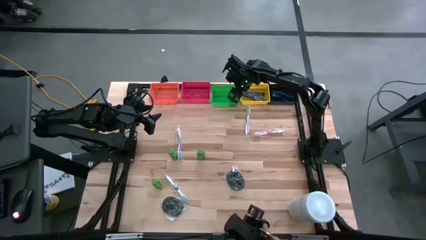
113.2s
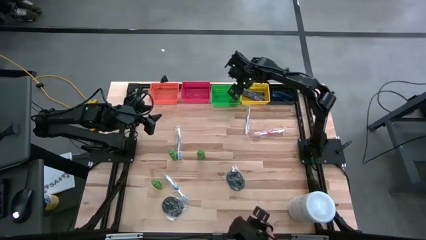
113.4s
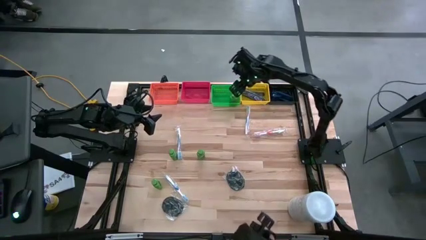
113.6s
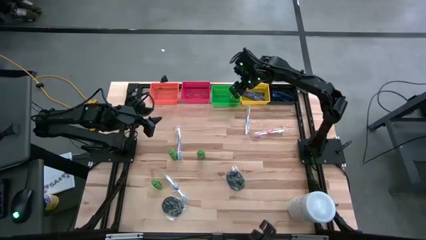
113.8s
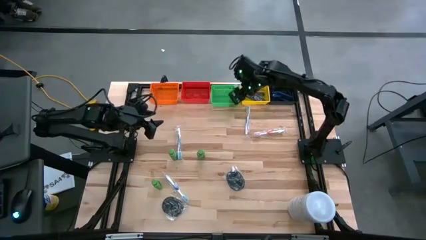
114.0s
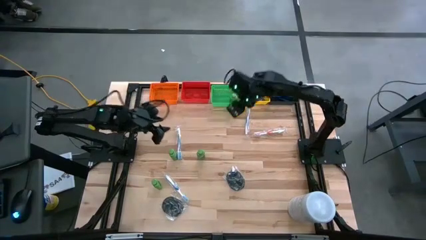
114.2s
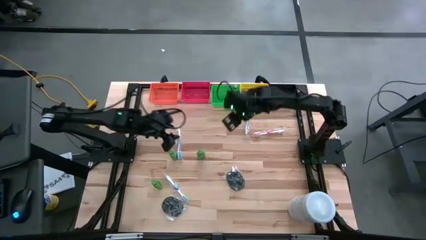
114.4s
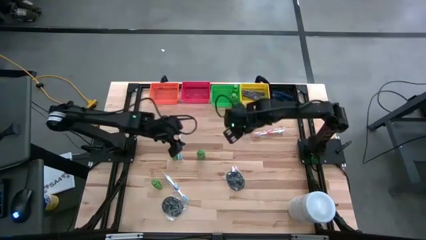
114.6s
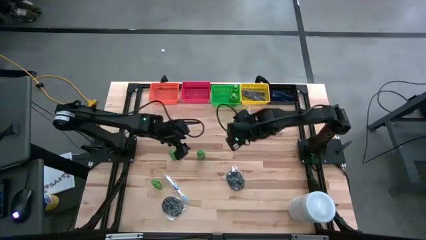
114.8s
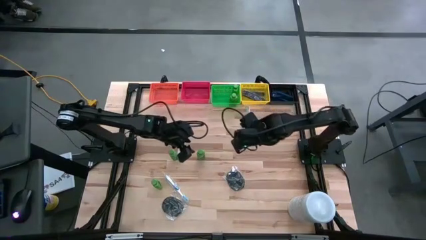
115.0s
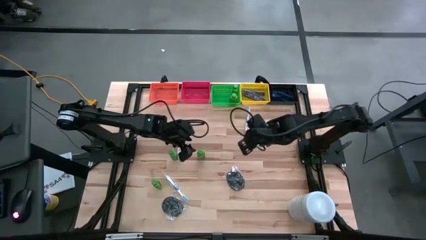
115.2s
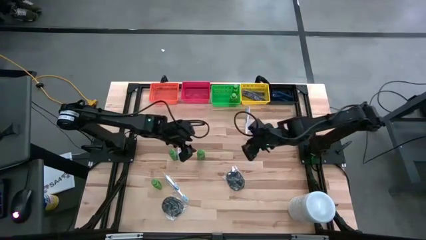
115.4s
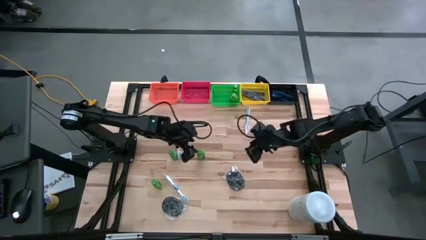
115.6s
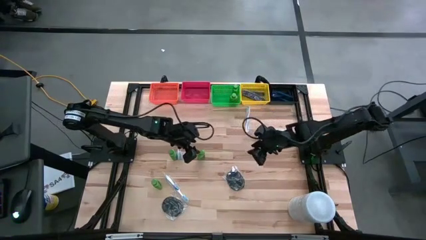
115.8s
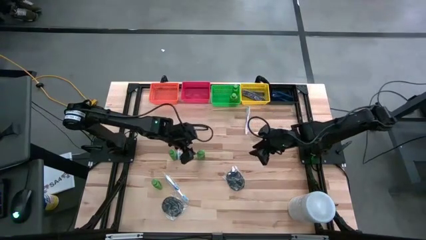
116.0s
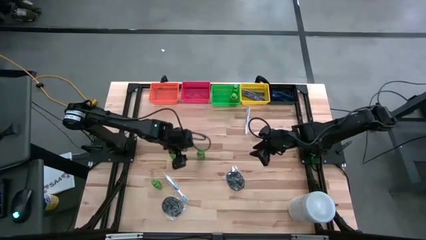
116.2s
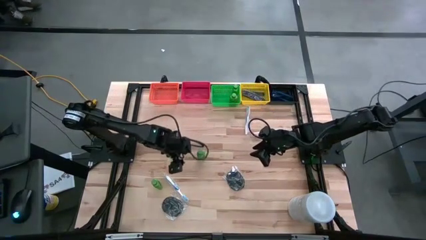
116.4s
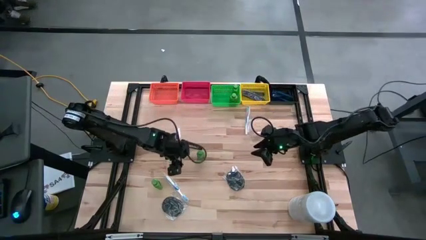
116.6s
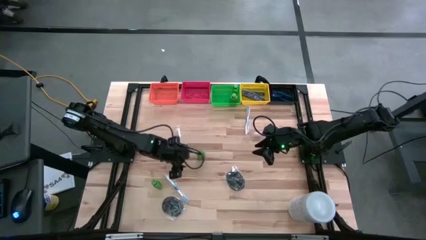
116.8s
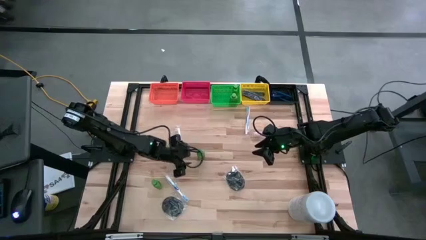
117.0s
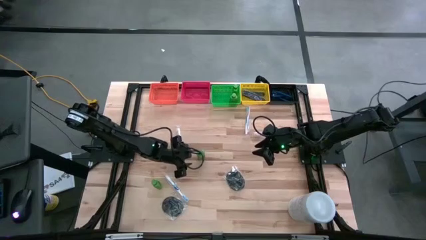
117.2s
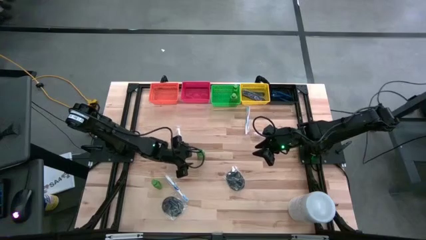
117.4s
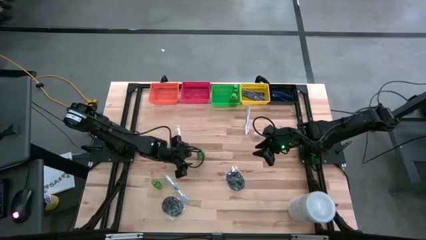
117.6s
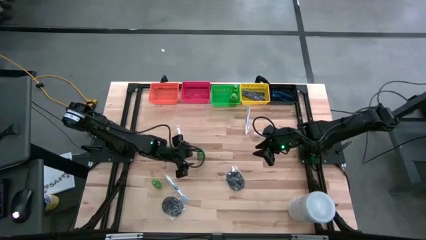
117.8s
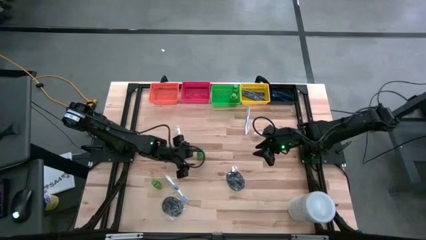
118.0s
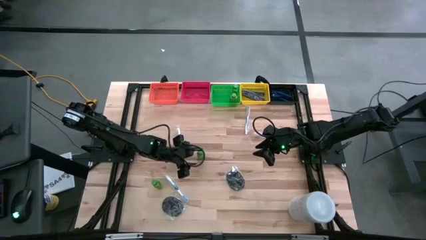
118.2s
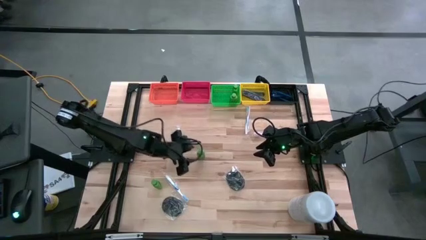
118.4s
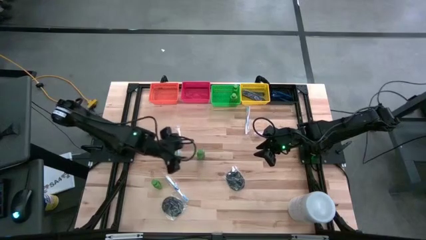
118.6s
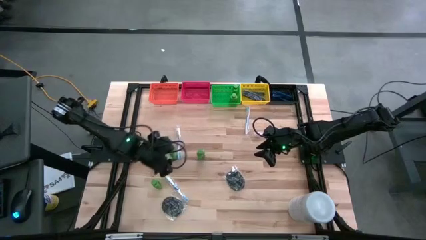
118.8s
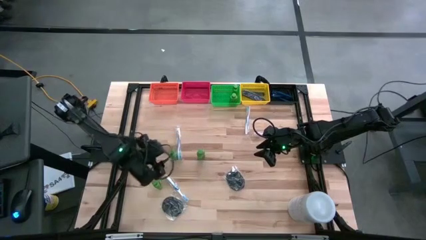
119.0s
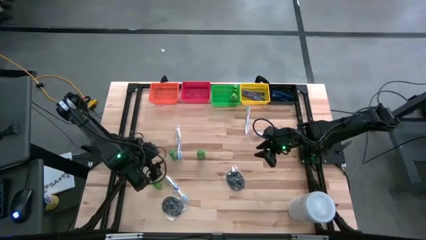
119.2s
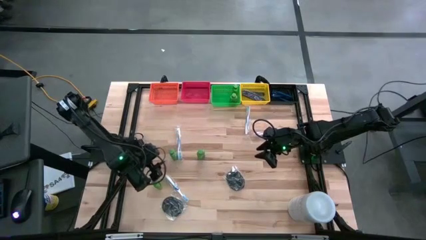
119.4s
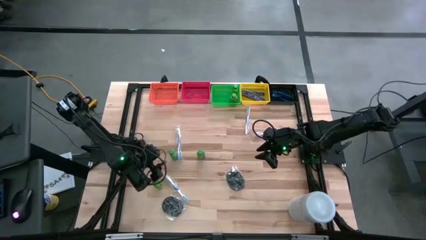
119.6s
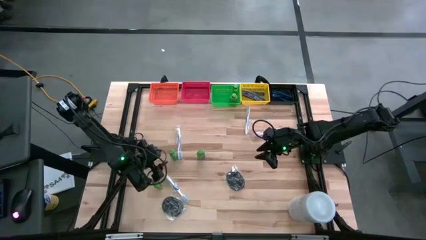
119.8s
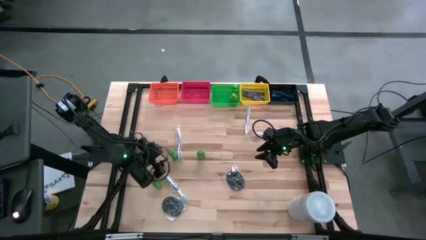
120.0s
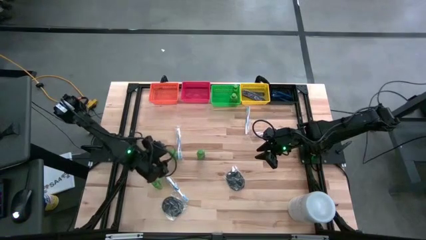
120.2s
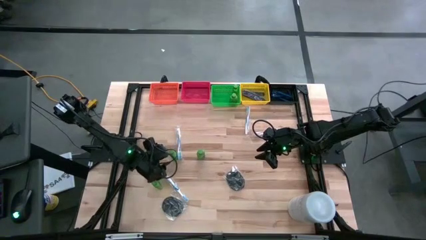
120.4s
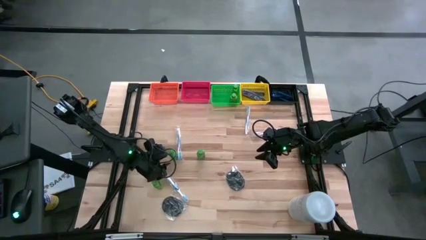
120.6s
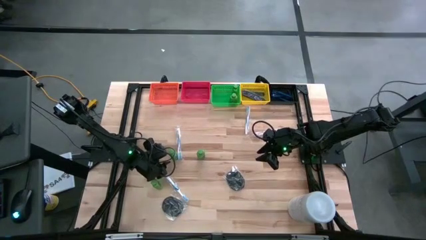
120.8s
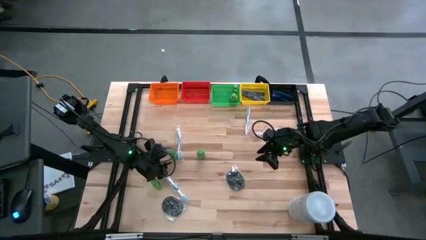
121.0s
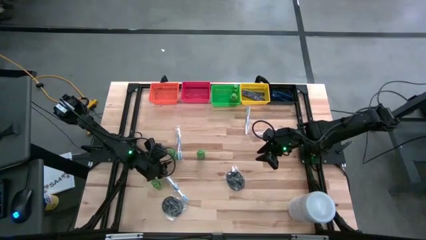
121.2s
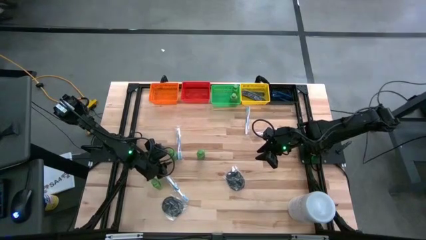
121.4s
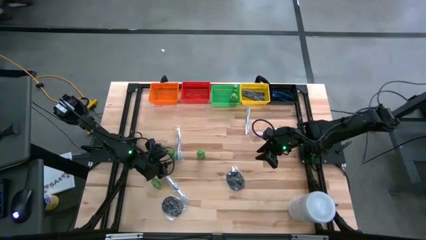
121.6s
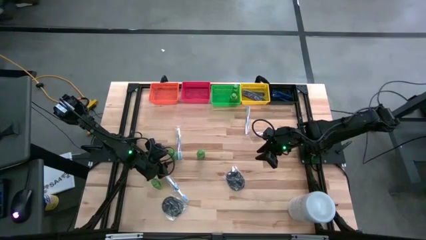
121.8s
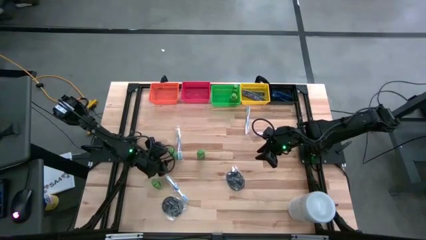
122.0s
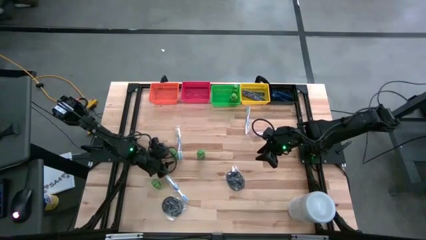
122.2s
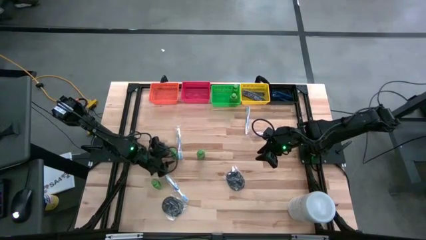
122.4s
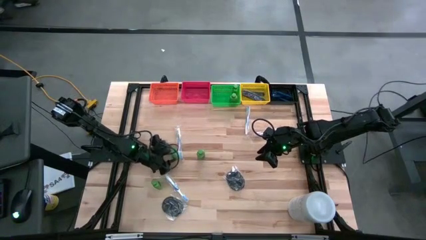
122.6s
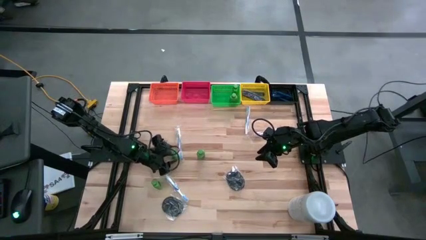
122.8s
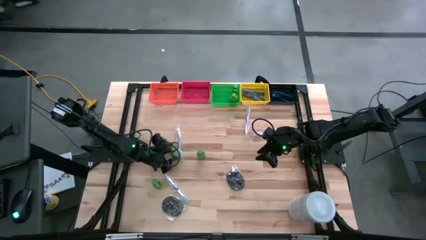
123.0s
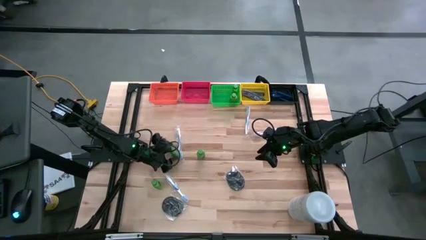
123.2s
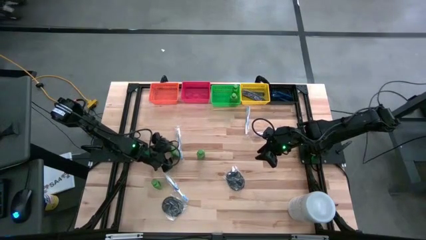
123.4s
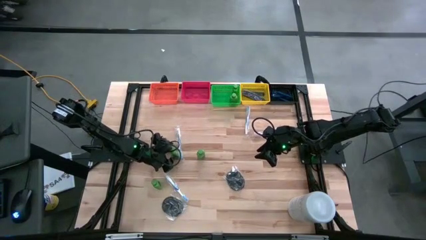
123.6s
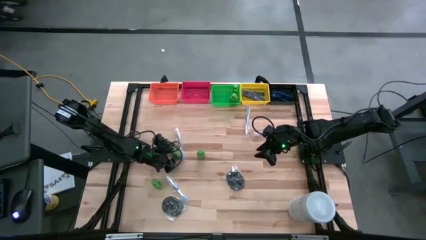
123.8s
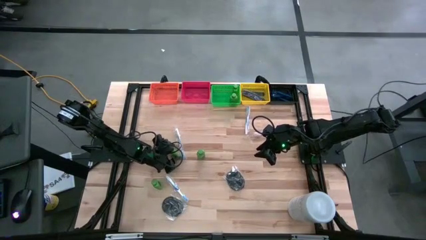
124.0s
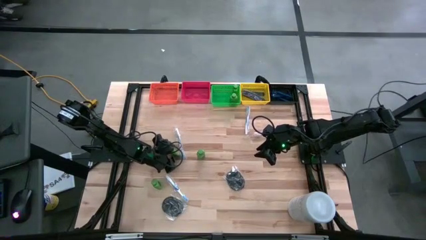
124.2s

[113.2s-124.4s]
Task: Pick & Place Travel size toiletries
Put the green shampoo into the green bin

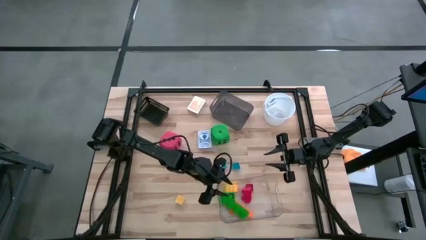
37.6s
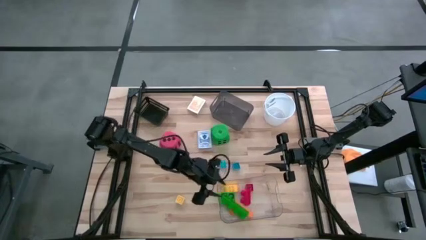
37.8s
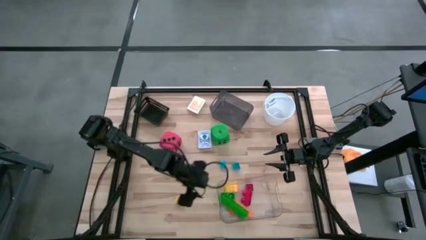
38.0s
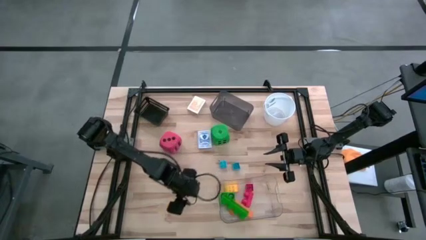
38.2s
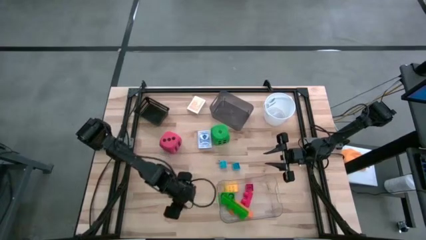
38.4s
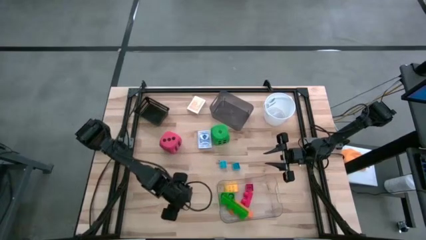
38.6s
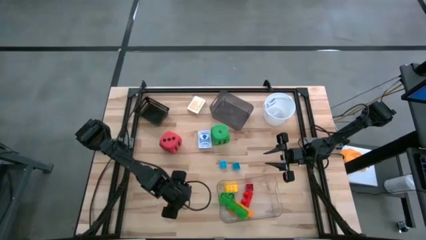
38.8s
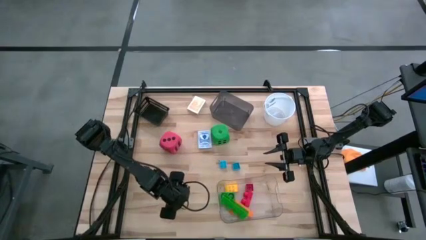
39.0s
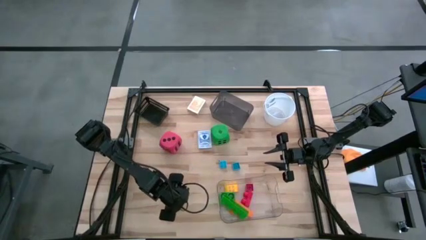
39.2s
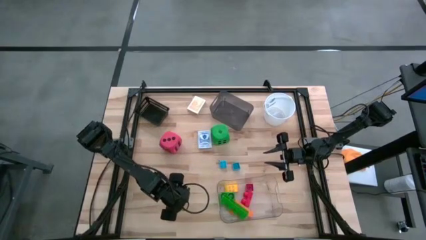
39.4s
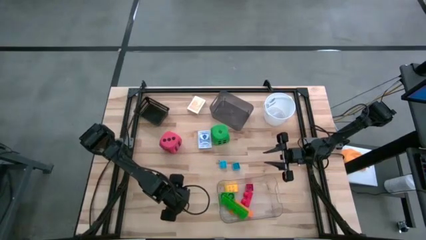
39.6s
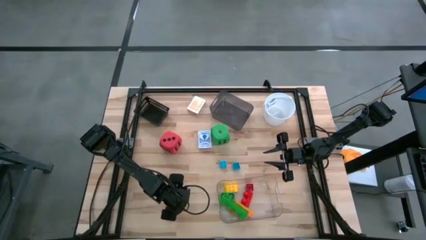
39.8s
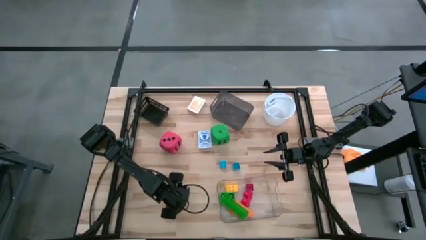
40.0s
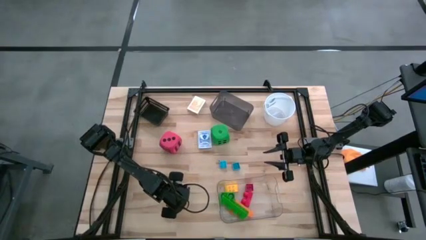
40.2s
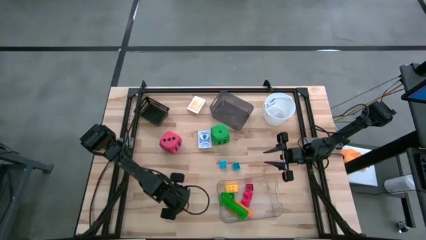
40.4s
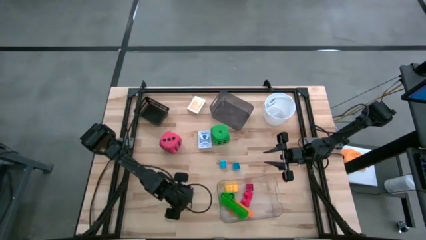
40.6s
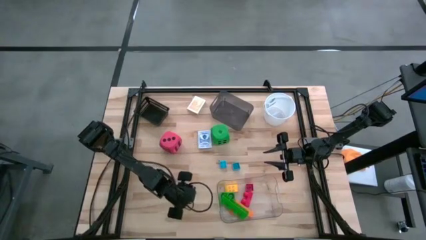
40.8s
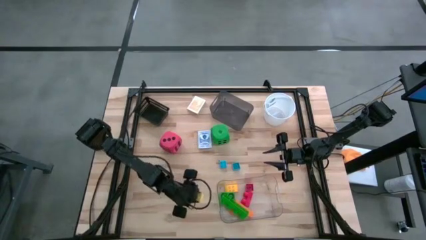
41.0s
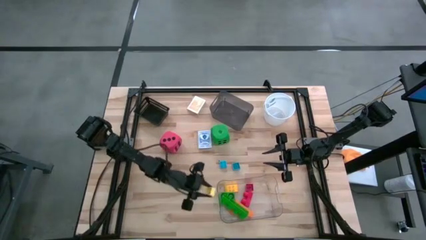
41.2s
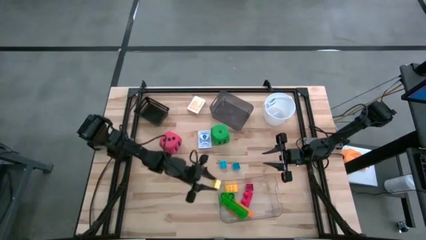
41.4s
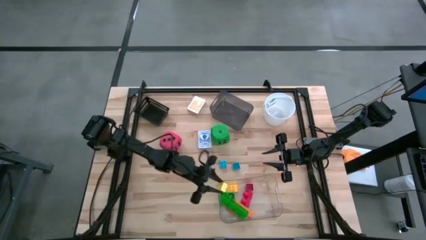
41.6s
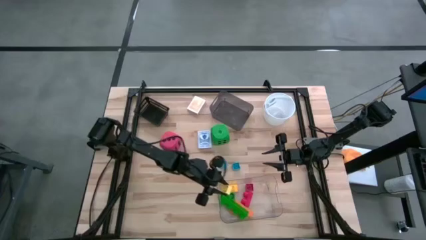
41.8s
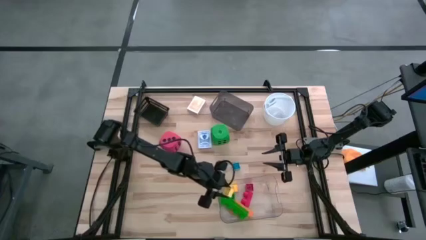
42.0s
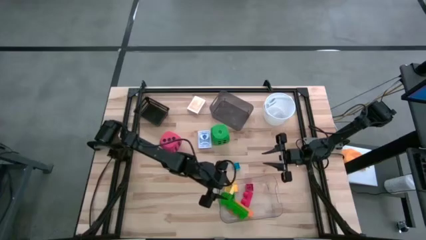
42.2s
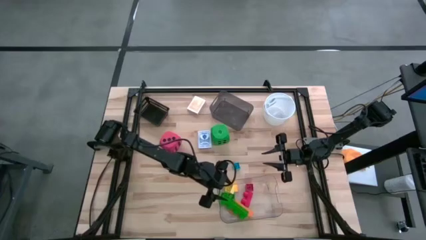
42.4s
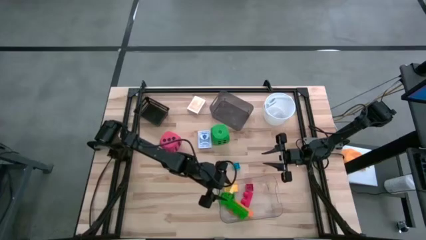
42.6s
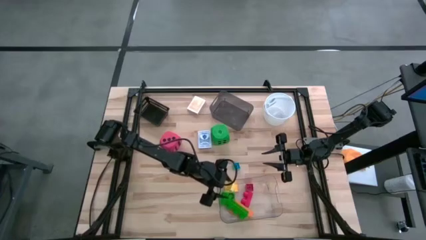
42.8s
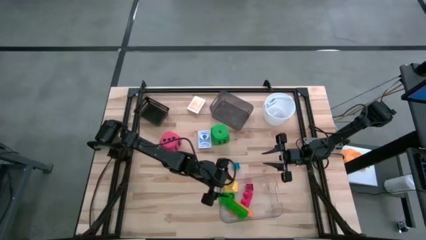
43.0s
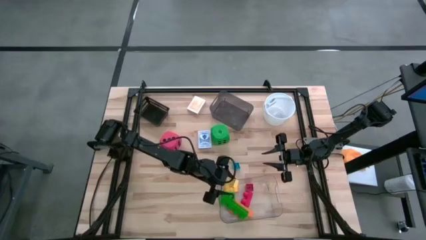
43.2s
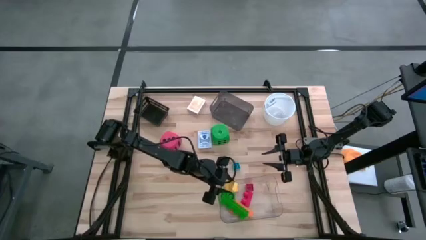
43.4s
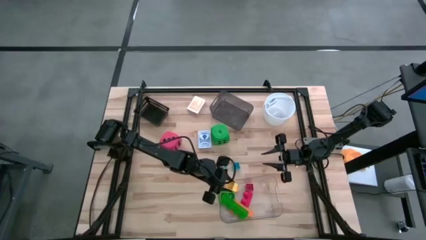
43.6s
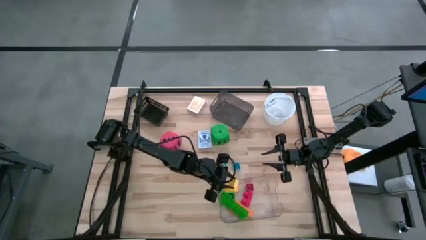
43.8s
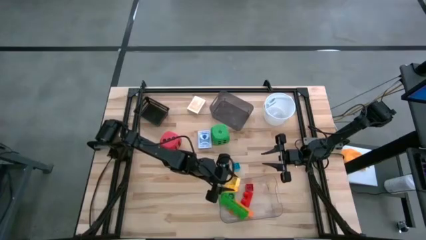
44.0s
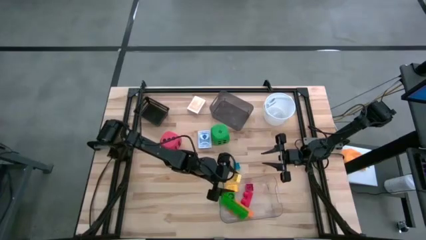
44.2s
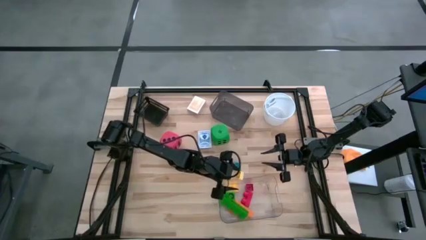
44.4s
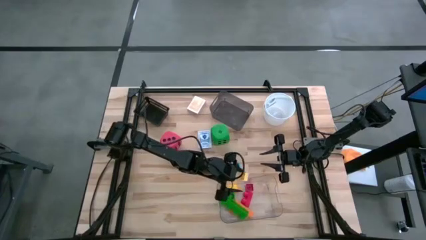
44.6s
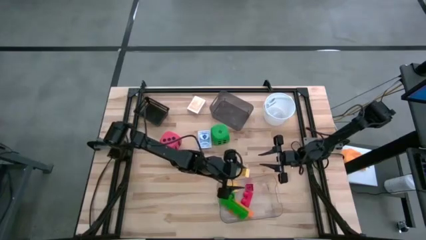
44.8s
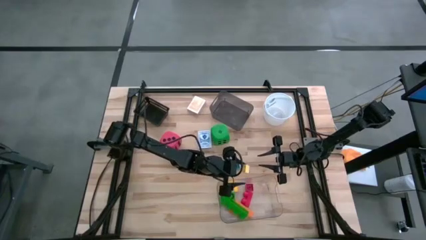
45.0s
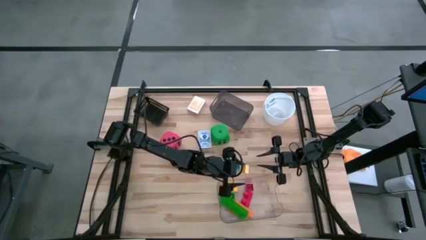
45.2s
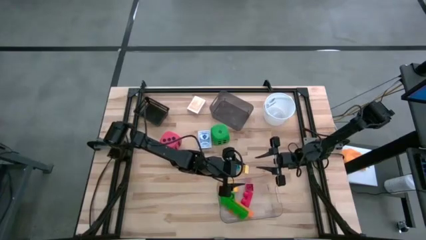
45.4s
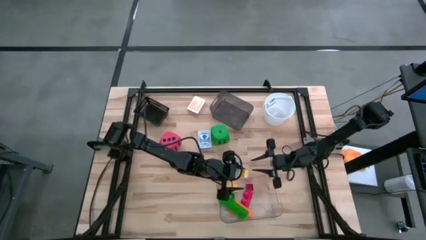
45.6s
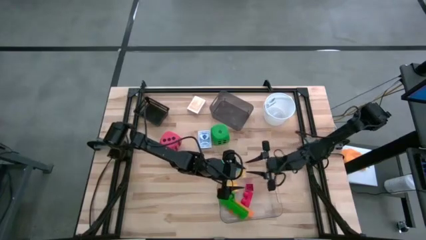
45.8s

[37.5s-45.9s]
Task: Pick & Place Toys
Put the yellow game piece into the bottom transparent bin
